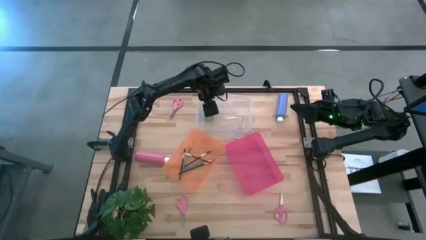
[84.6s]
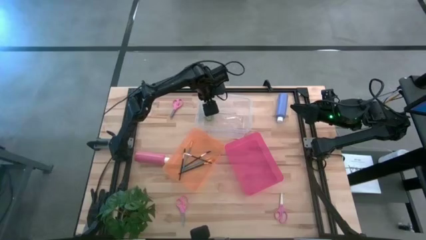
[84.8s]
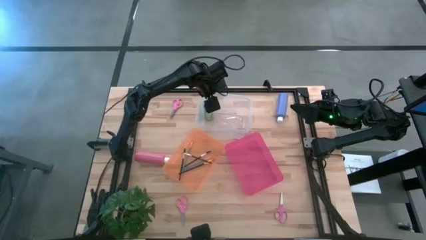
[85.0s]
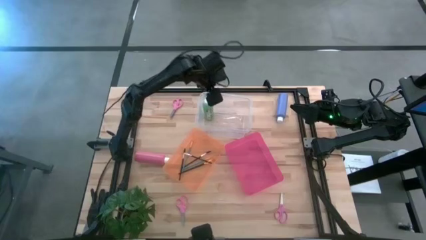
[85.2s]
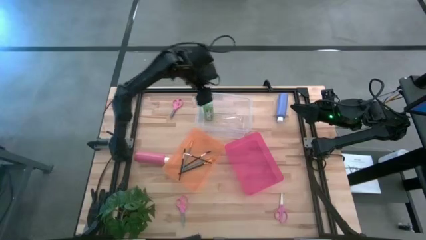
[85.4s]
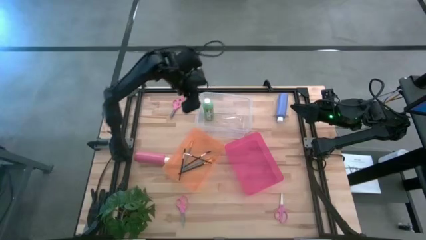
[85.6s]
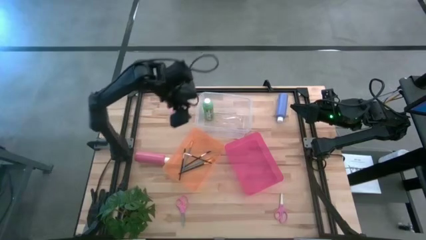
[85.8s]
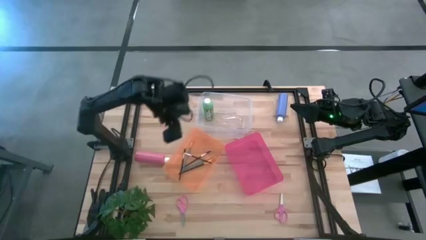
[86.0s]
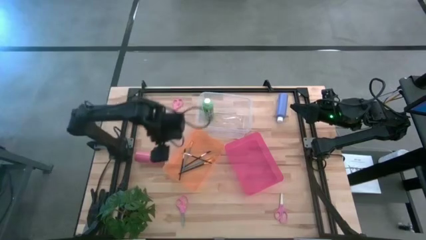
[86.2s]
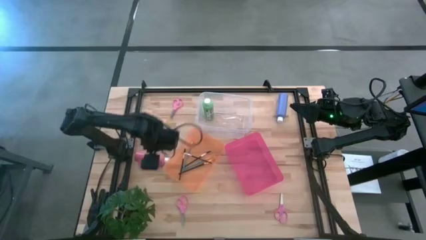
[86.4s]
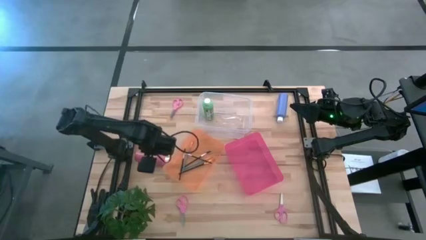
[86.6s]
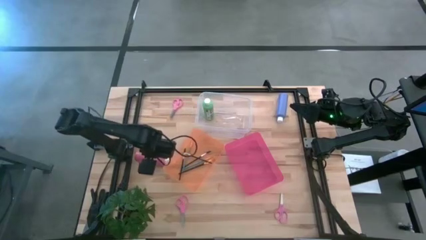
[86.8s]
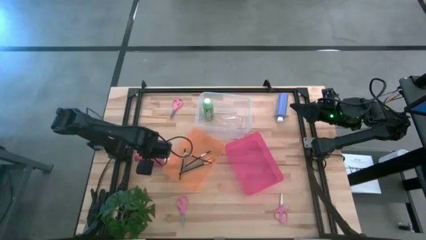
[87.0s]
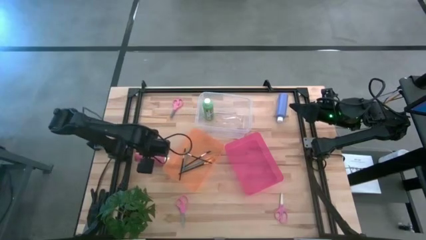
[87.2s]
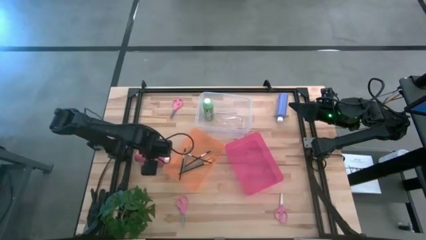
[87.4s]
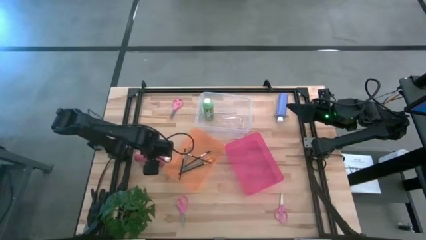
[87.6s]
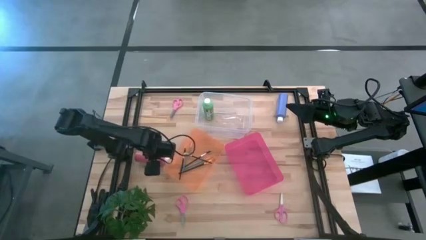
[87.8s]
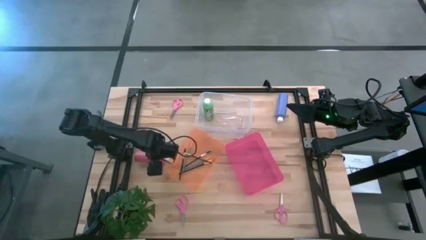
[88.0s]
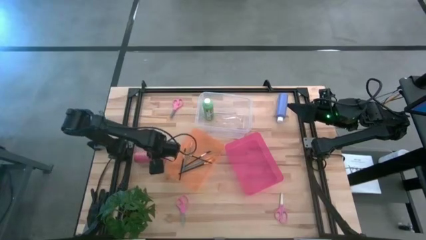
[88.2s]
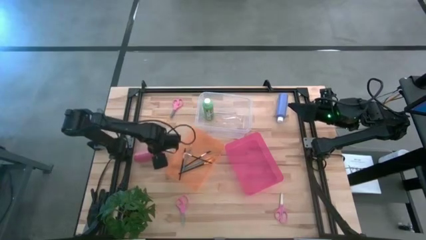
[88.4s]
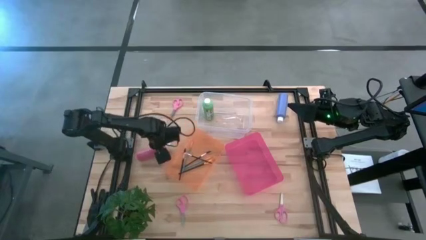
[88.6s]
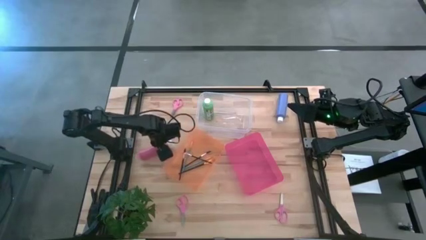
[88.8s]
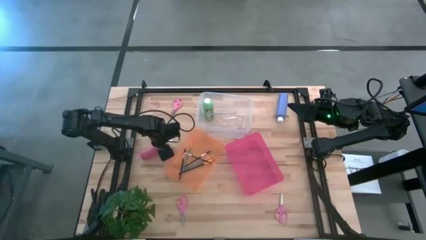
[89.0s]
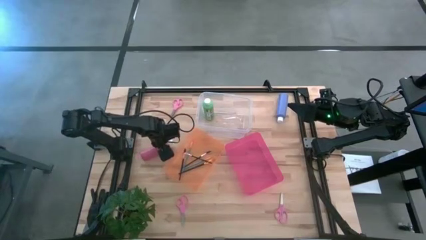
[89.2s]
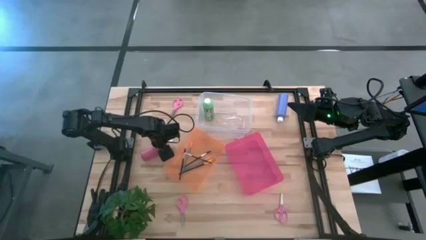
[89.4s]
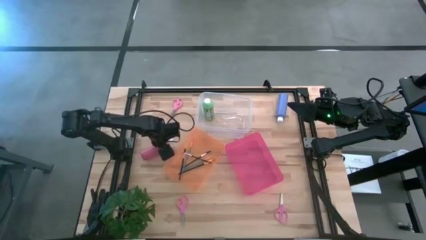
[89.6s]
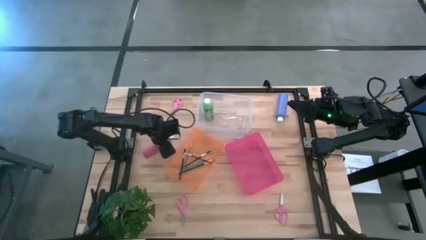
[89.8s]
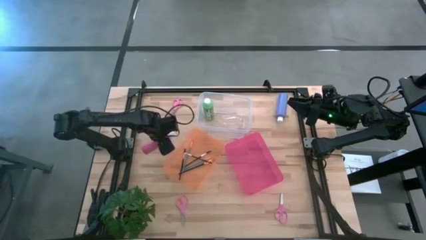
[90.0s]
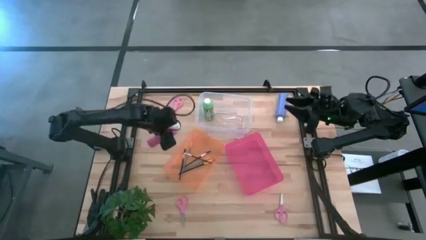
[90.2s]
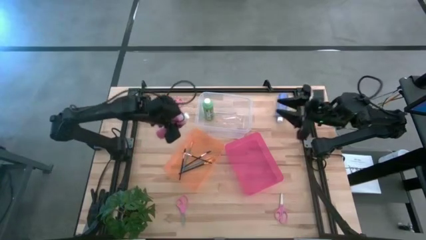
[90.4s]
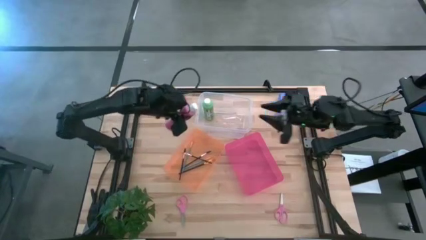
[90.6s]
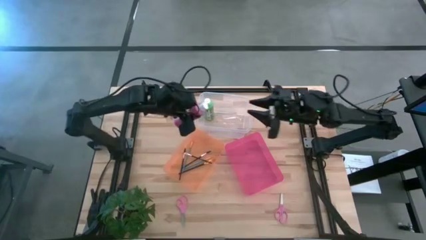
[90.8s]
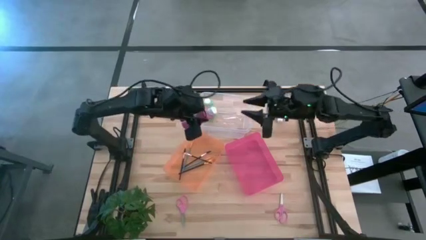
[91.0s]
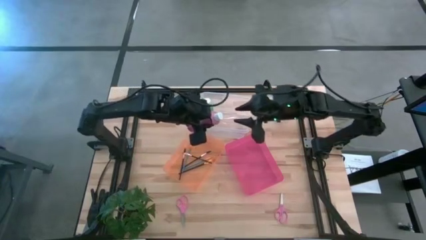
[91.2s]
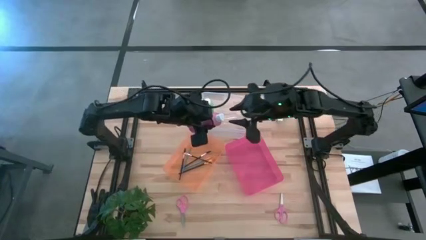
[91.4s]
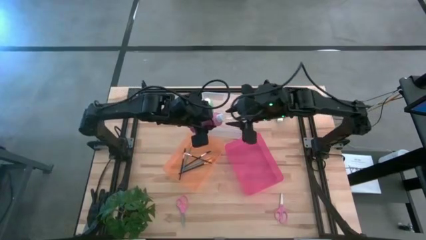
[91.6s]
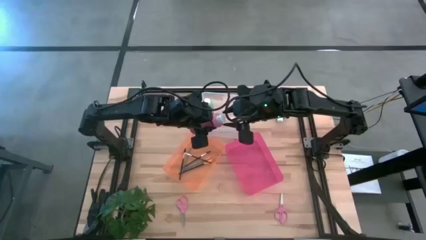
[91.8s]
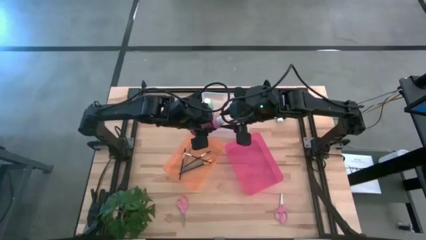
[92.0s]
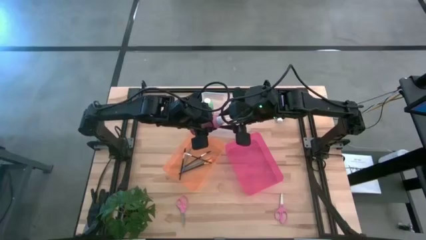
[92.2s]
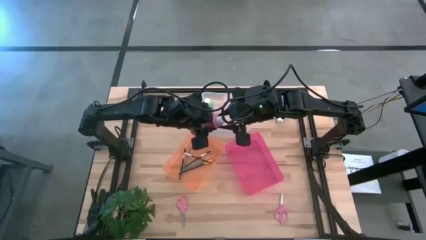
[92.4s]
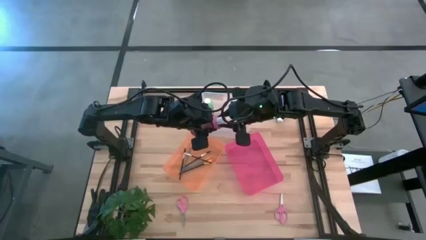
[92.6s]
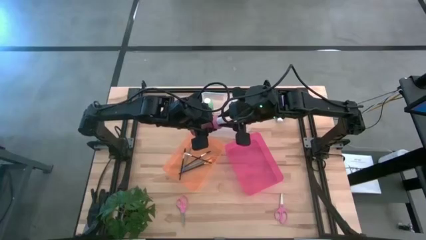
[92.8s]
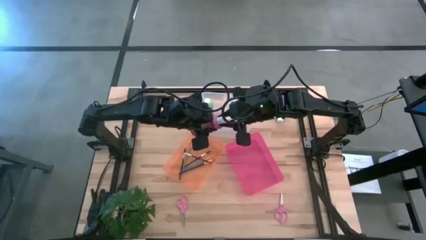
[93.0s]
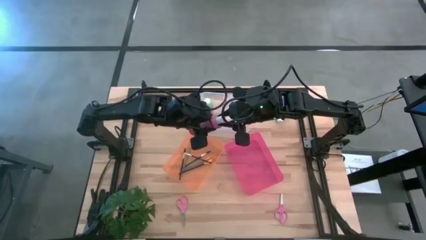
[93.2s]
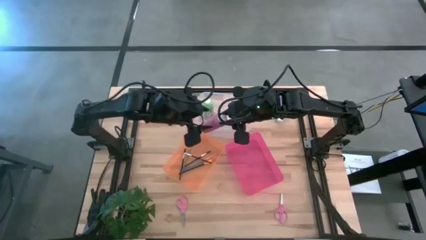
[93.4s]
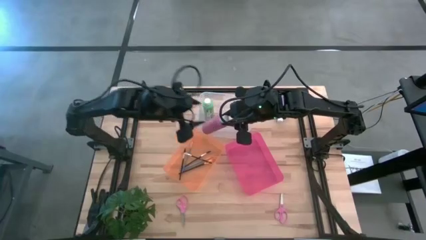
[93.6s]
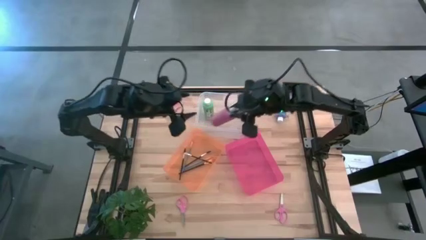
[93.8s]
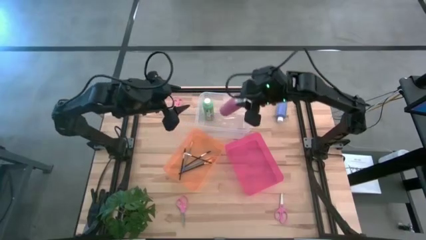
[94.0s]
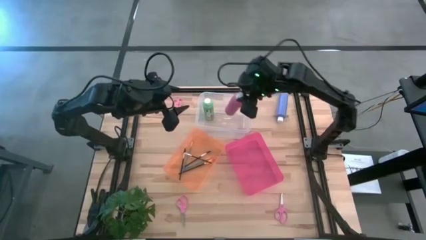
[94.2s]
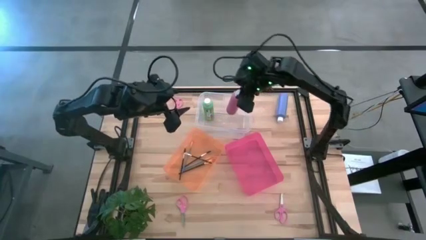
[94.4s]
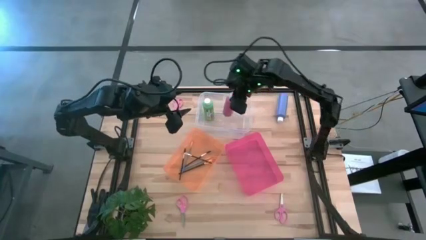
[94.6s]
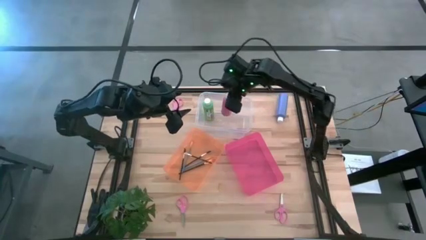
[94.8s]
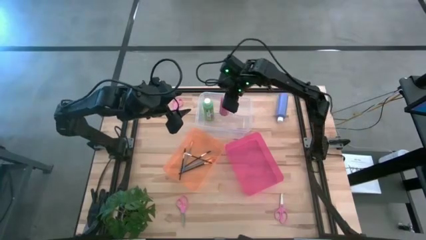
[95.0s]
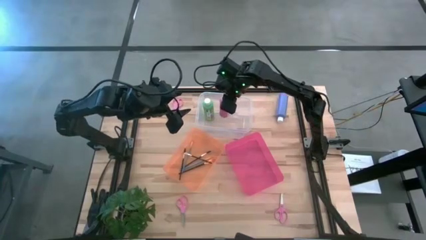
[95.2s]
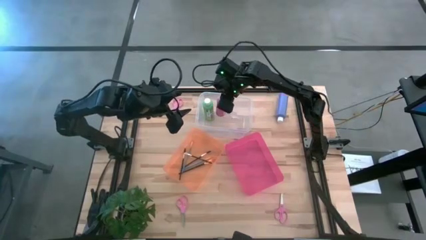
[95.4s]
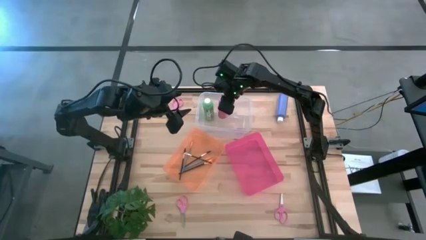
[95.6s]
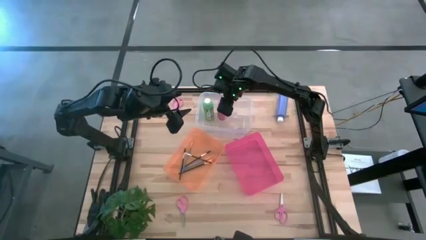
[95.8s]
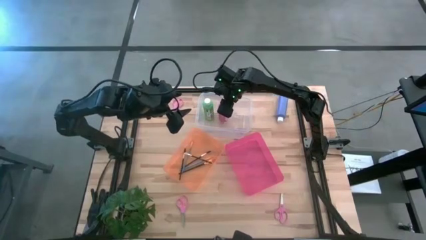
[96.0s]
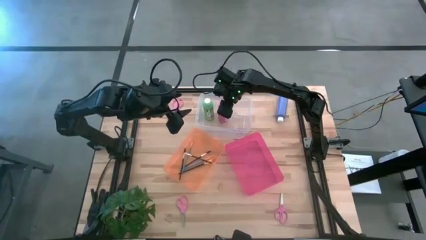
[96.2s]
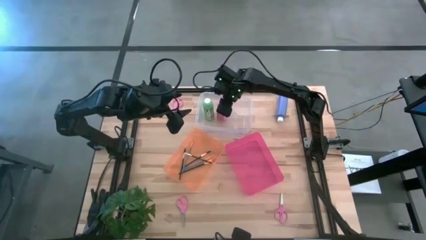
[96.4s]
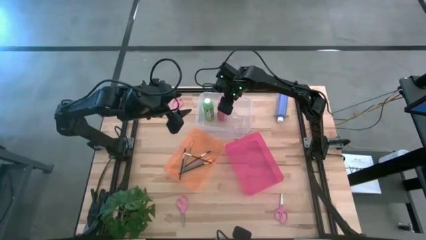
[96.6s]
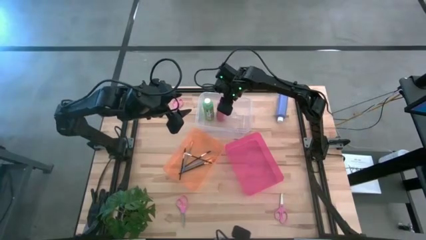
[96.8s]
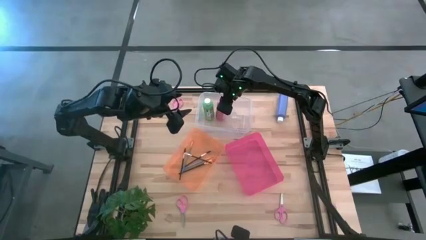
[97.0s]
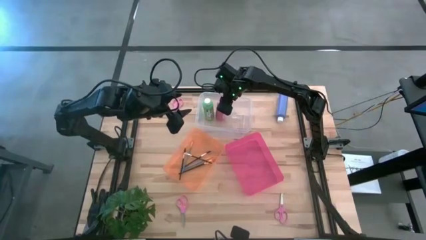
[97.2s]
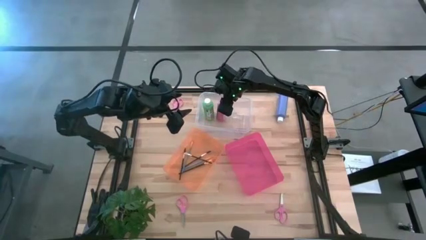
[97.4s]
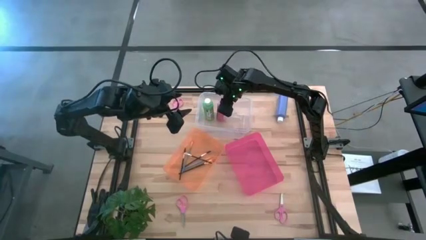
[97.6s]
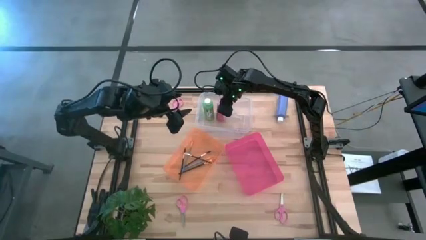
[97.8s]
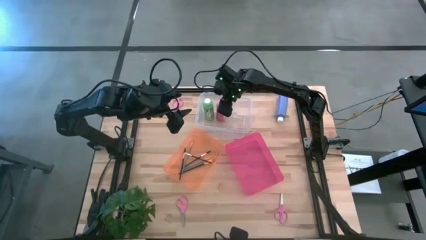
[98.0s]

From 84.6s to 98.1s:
Task: Pick & Place Paint Supplies
Put the pink paint bottle into the transparent bin

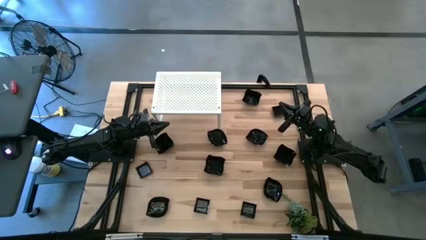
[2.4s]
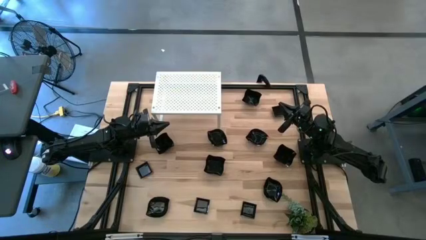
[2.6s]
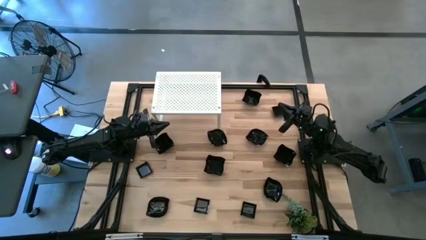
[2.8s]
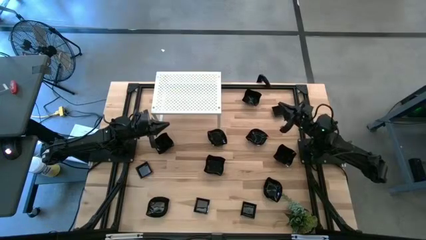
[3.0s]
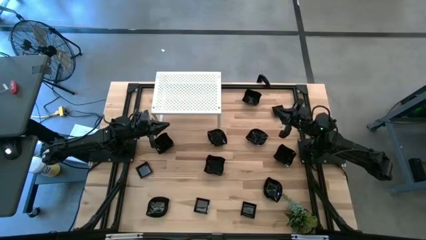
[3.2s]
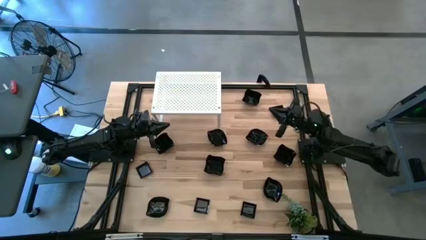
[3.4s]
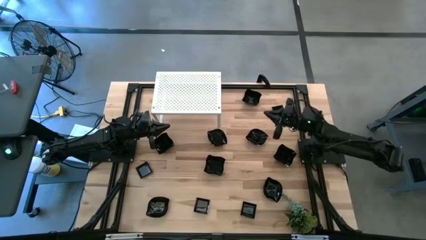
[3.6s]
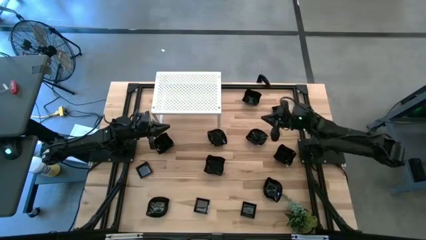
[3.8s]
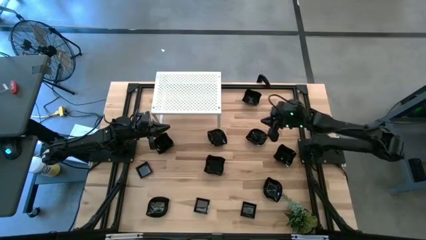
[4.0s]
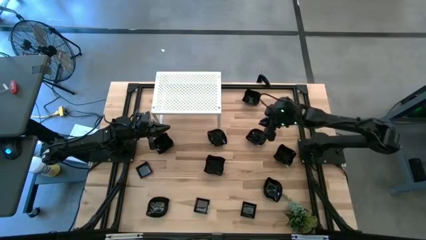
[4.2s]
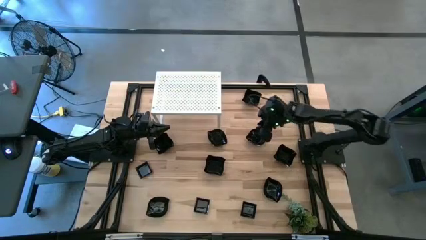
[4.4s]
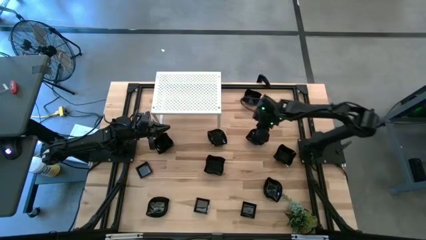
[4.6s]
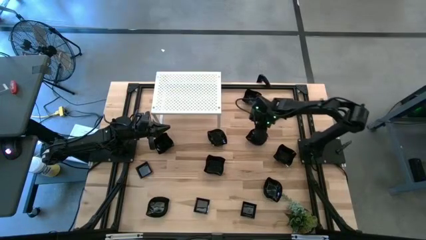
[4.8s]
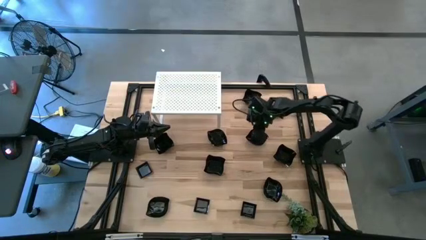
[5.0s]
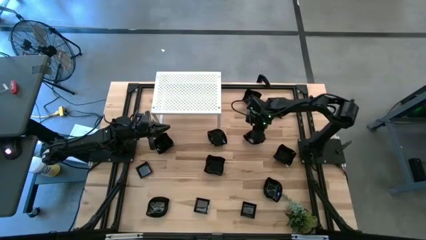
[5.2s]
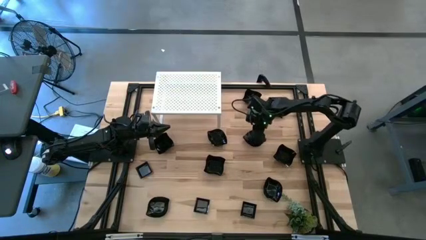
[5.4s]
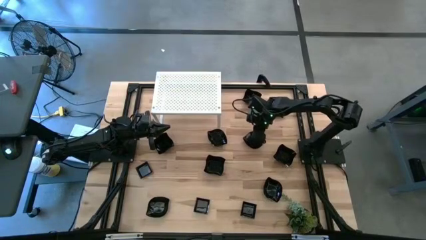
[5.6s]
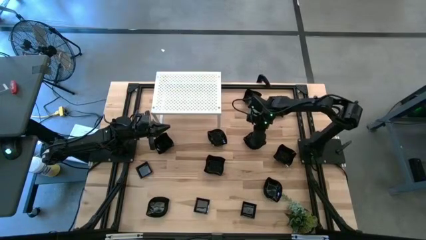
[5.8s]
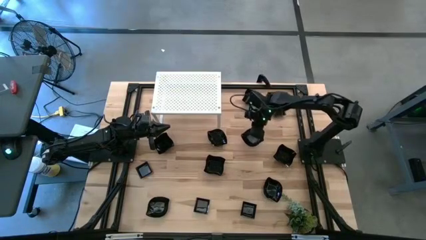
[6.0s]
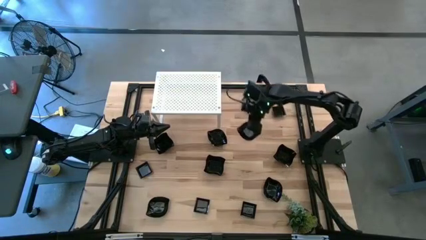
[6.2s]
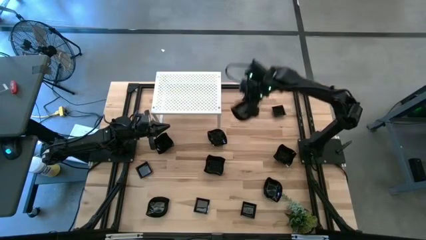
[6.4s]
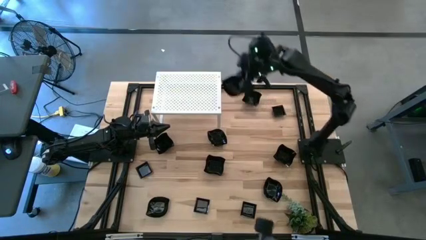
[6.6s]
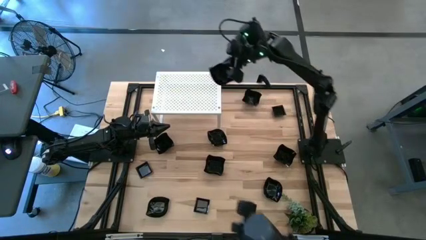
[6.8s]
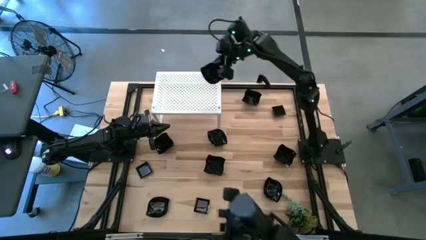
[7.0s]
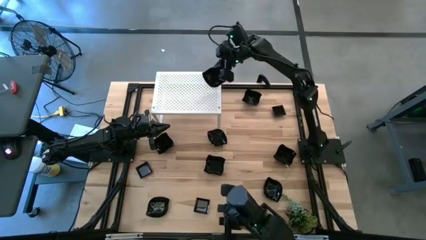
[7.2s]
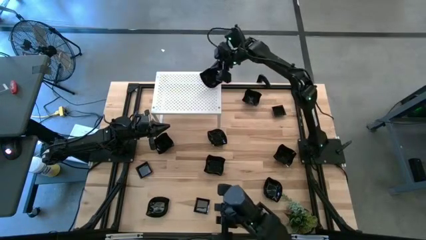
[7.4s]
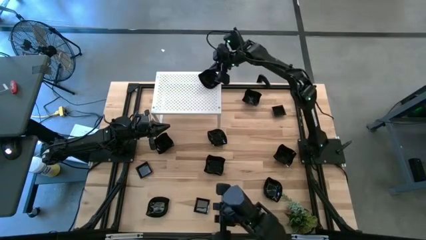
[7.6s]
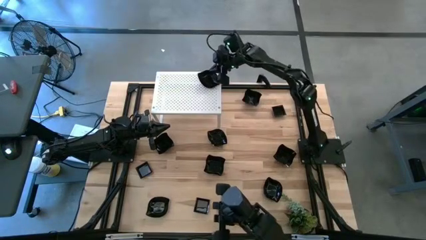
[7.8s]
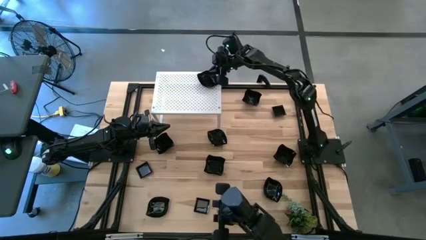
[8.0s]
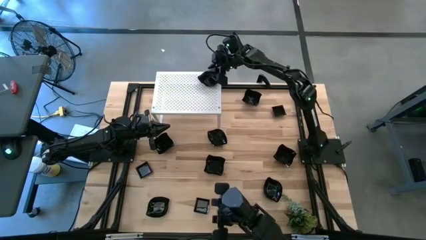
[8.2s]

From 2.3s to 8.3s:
Task: Pick & Place Mini shaped plates
Put the black leaf-shaped plate on the shelf
